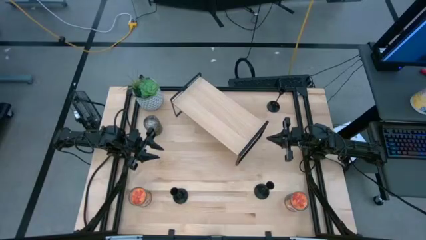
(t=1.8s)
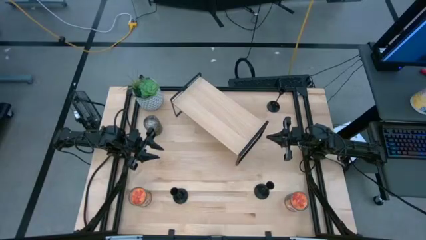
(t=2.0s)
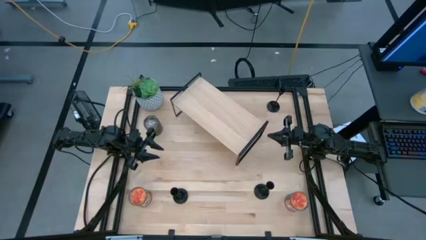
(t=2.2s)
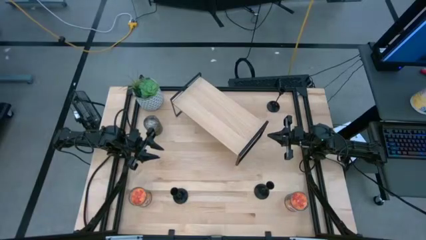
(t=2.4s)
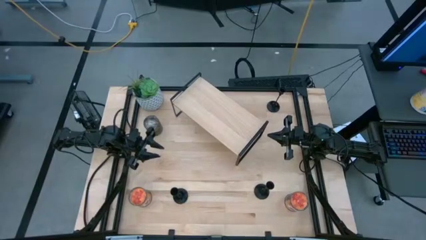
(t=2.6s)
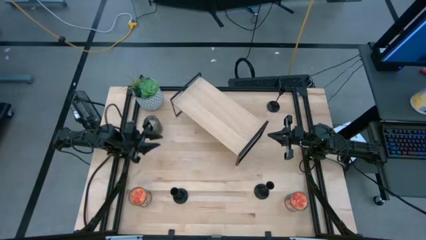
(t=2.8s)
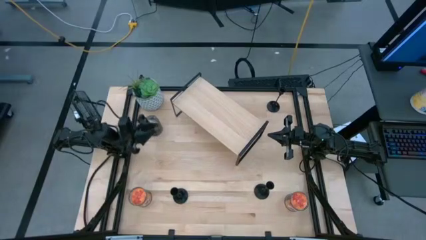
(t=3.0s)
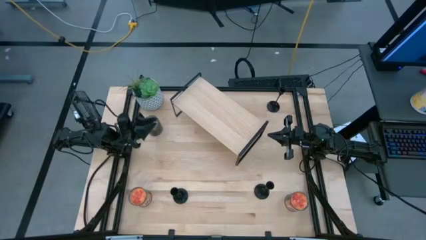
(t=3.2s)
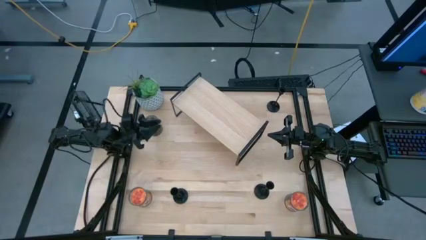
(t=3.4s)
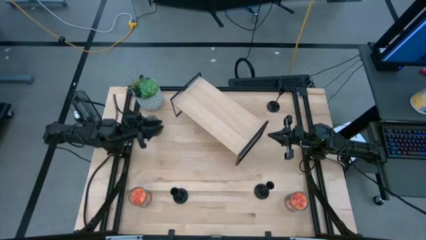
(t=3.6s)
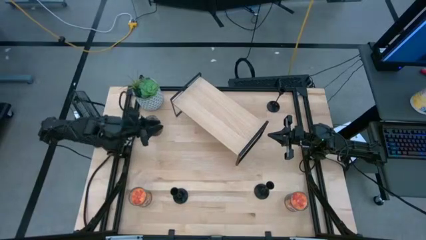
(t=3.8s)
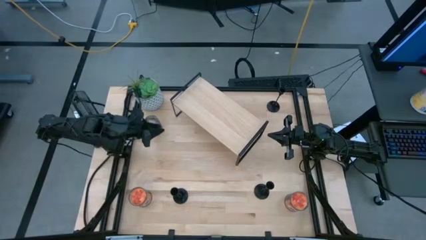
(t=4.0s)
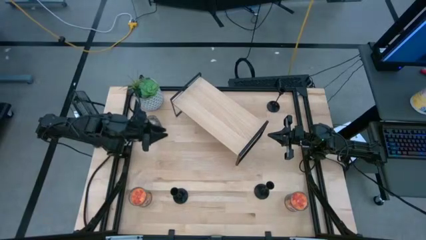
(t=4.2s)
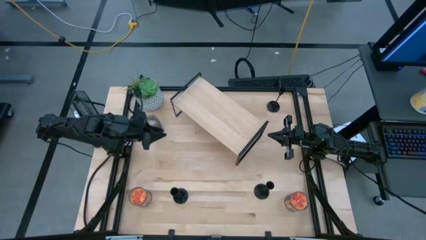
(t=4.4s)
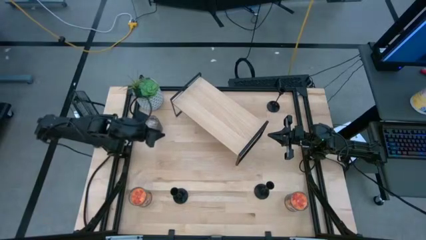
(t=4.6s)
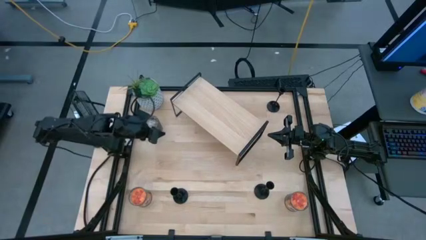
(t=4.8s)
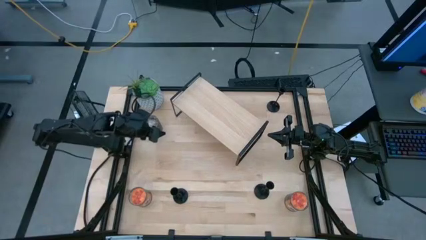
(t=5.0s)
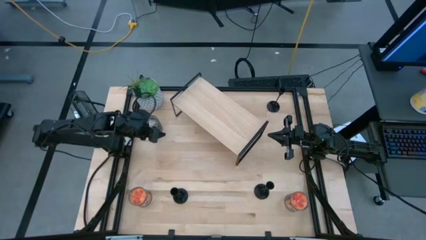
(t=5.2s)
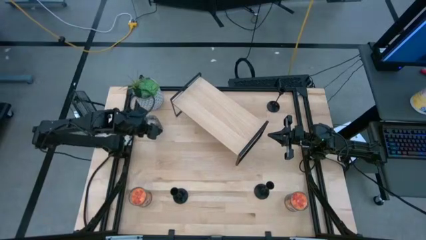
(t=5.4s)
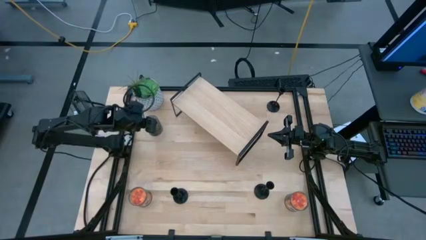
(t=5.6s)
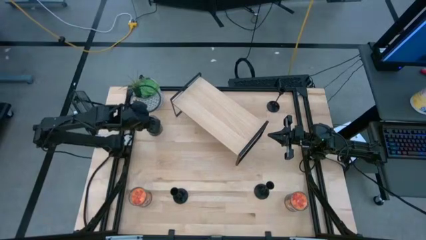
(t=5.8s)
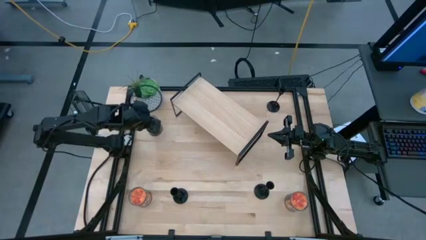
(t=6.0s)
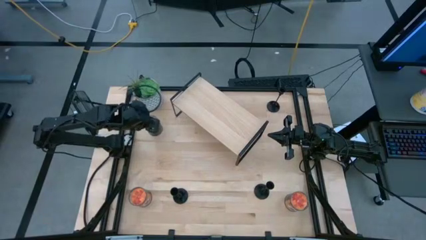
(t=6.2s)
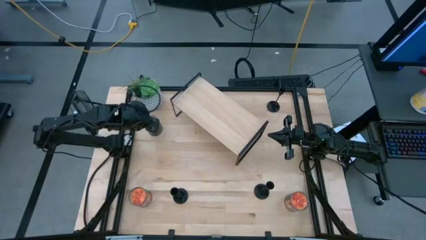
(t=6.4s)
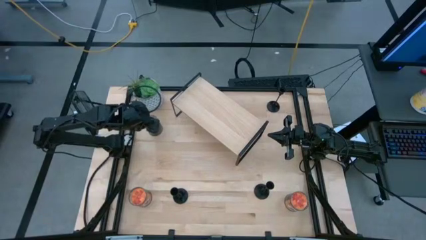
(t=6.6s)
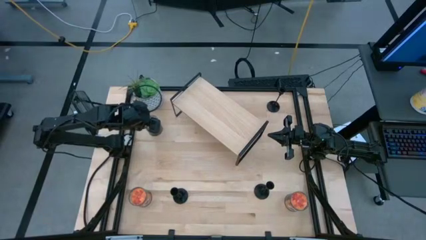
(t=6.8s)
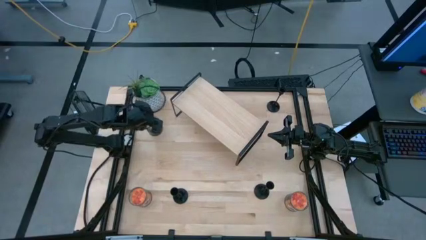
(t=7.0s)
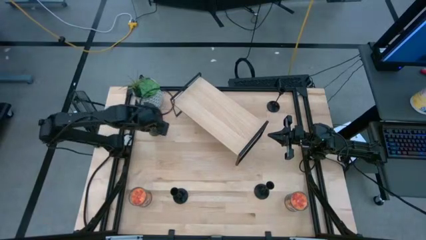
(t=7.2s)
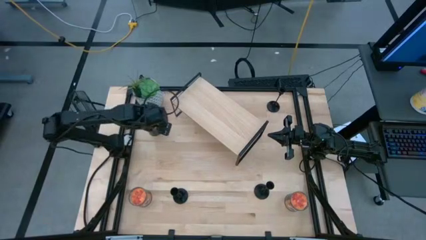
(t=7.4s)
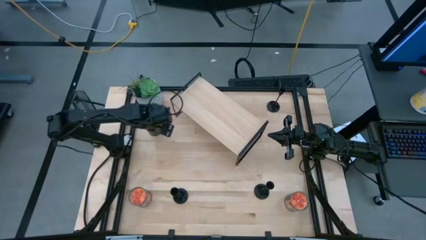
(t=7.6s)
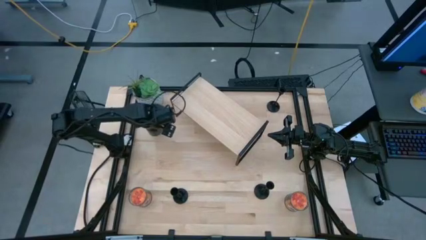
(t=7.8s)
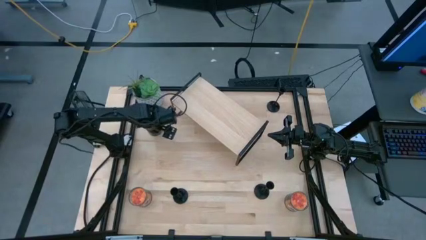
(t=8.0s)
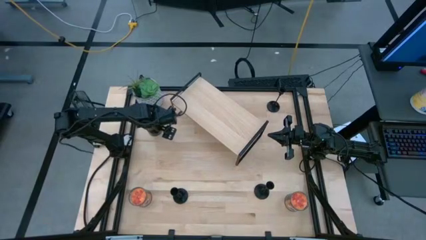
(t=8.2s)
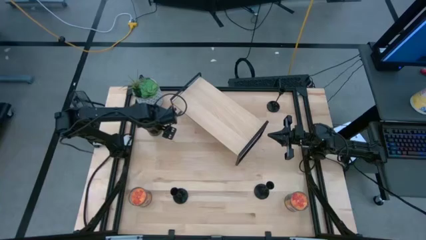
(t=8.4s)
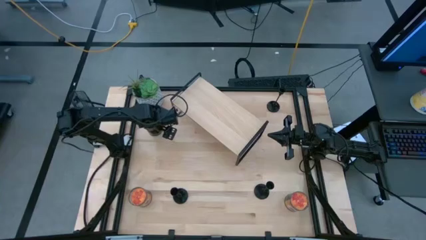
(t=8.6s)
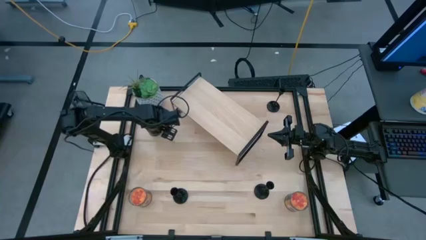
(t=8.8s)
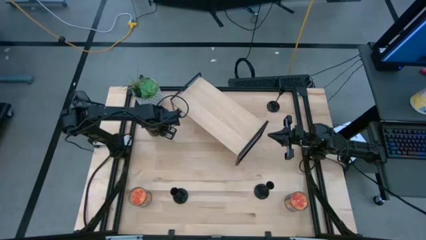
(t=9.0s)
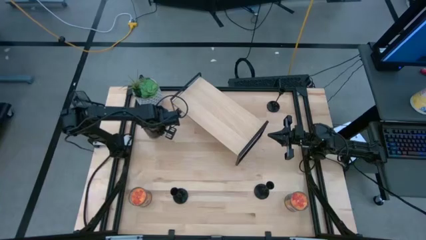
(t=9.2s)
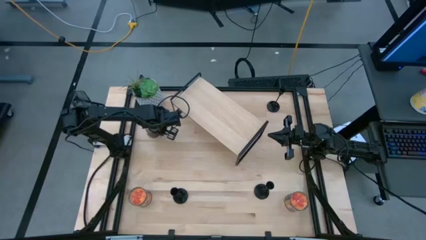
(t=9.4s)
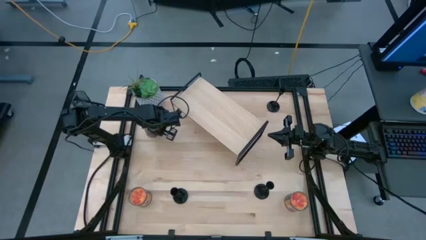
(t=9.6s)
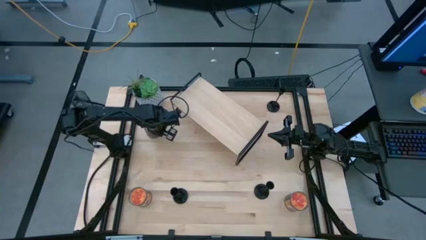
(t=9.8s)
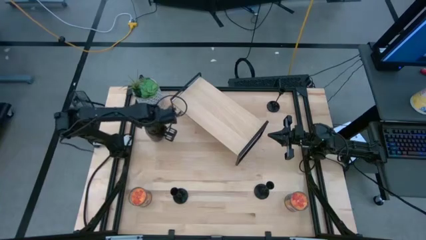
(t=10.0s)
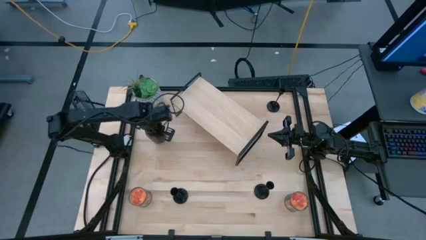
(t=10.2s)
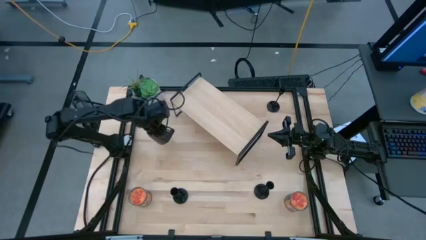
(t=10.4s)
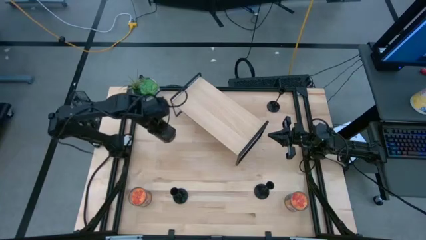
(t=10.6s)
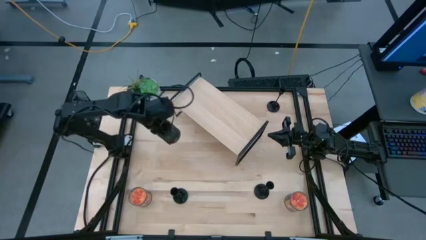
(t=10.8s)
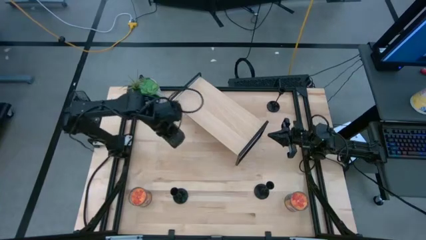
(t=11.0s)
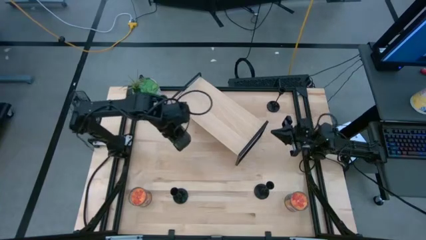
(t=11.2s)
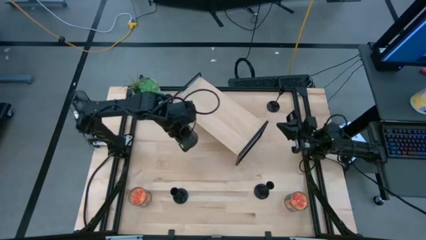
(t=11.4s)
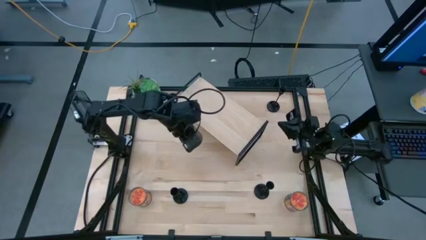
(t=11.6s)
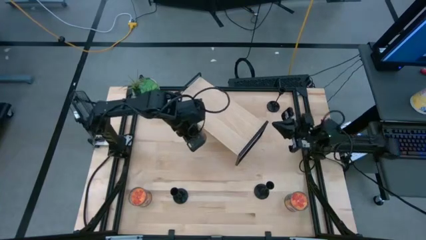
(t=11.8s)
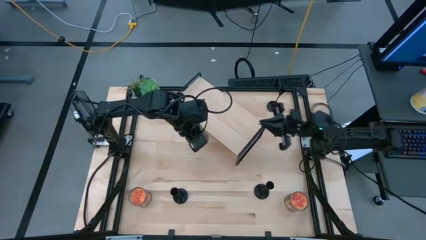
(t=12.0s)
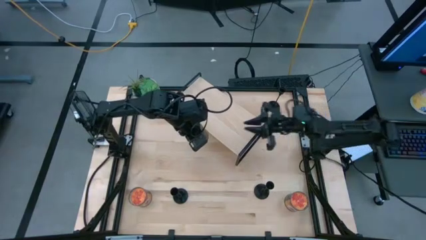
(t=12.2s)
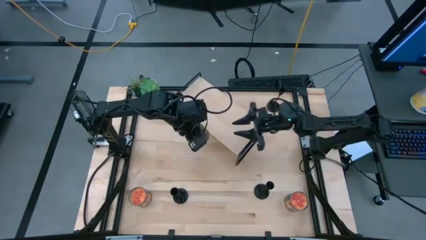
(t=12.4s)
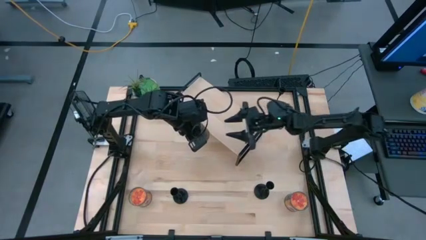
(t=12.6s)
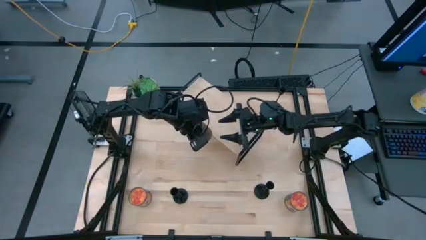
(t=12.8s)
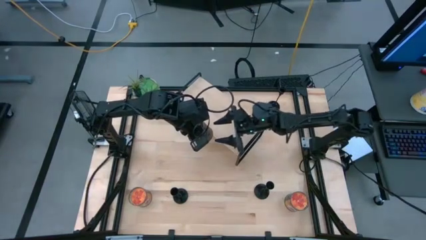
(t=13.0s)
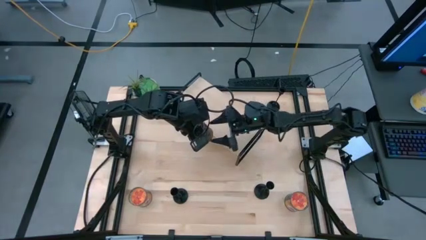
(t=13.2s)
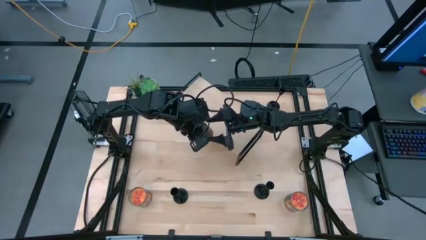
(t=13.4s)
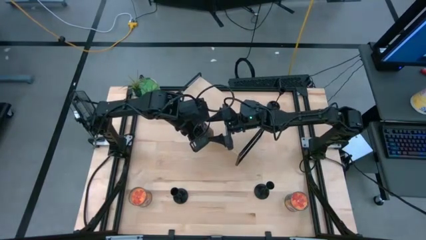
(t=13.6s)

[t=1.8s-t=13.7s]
Task: Pick & Place candle stick holders
Put the brown scented candle on the shelf
